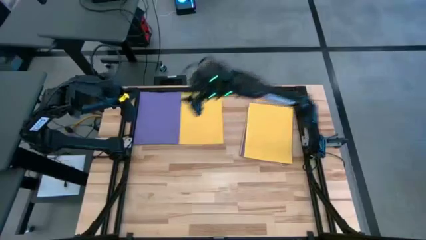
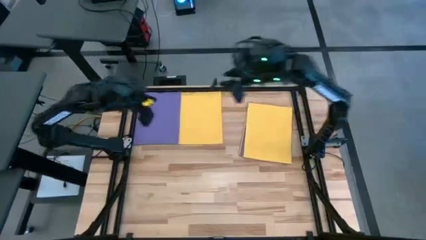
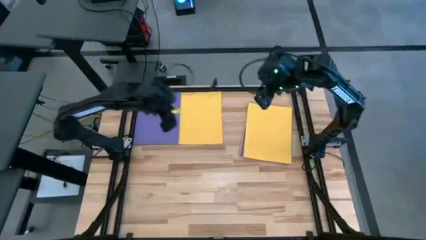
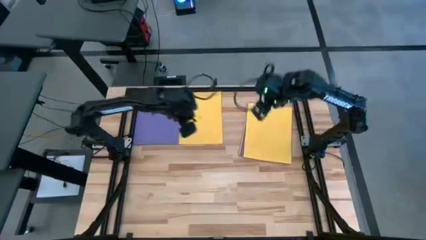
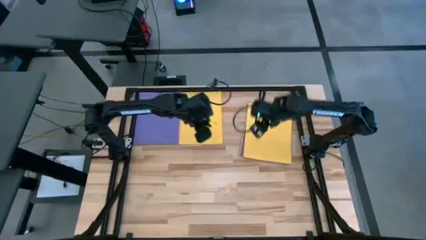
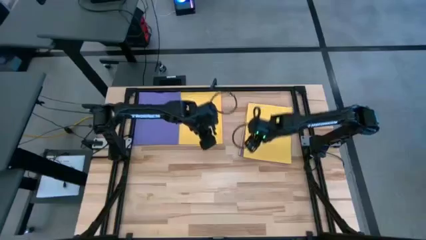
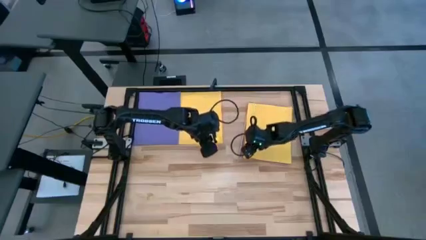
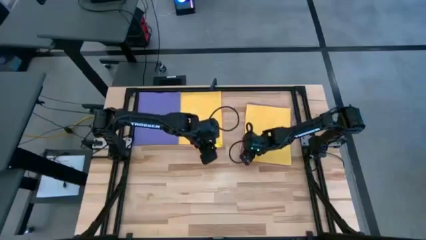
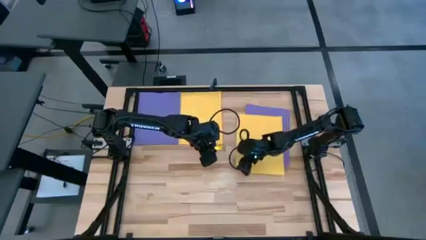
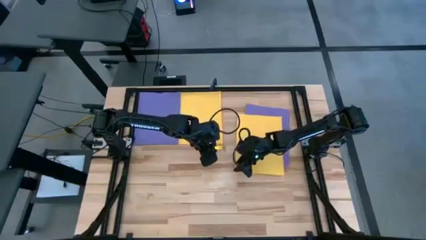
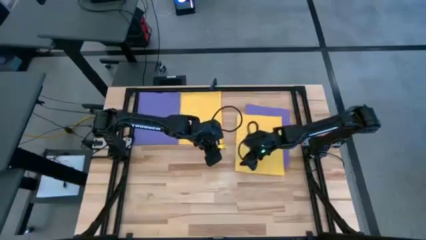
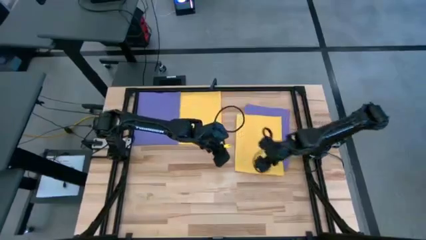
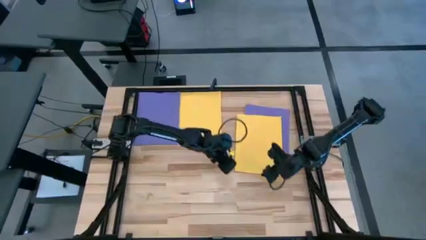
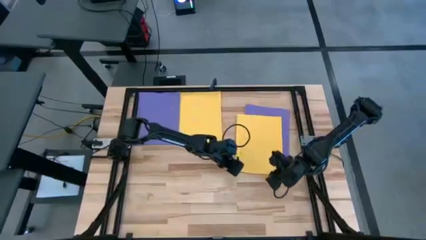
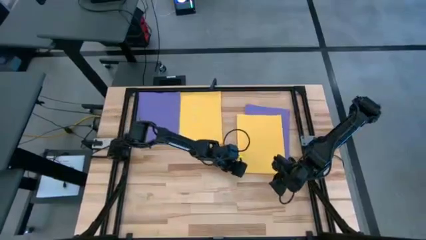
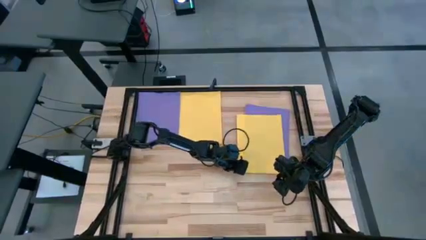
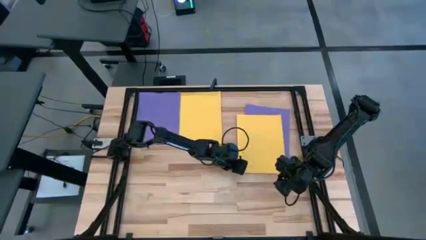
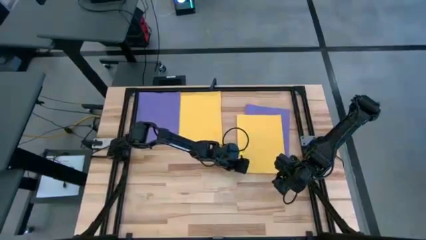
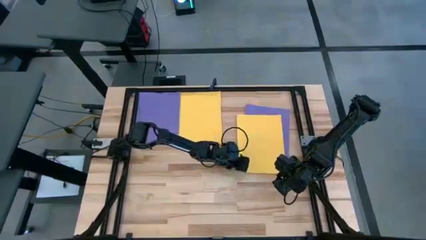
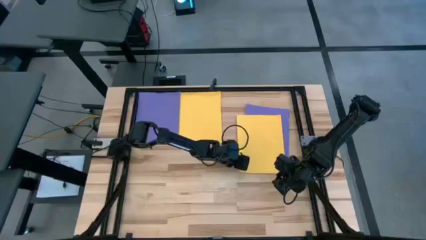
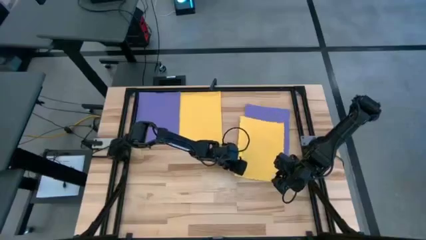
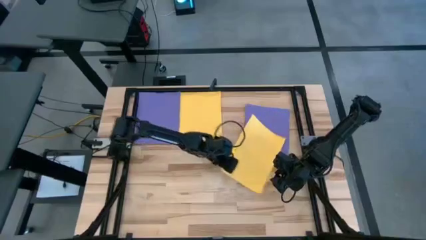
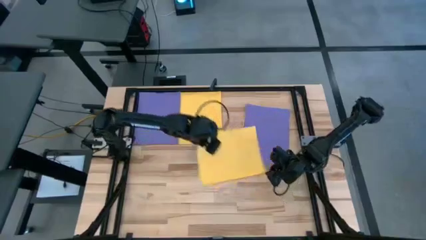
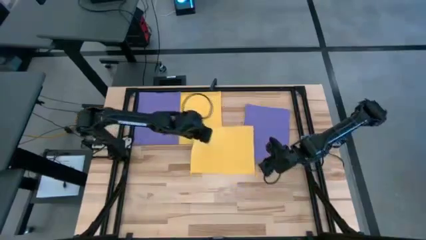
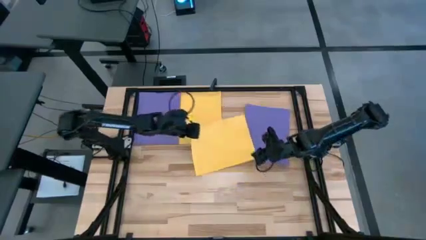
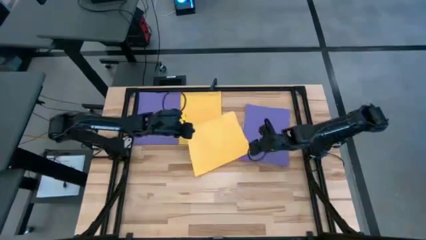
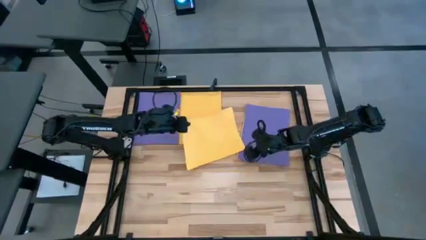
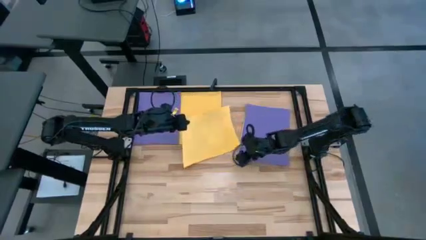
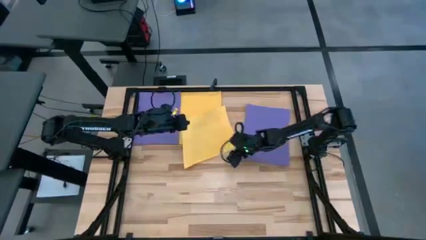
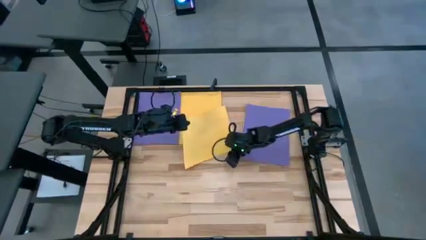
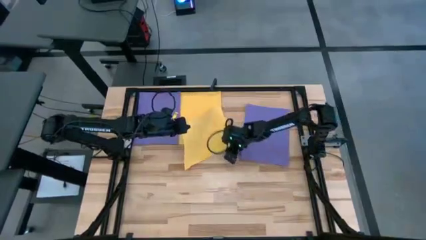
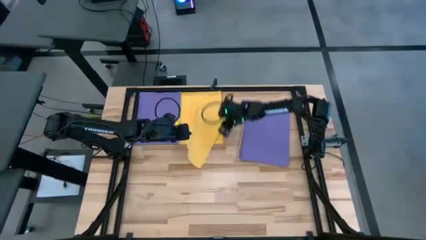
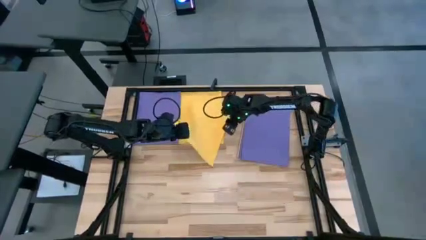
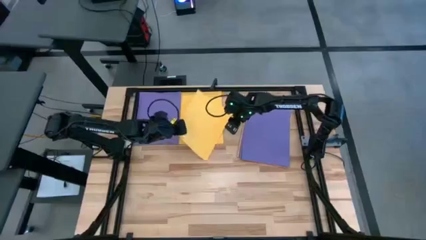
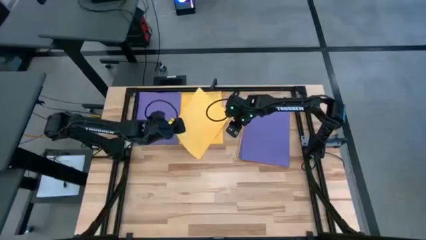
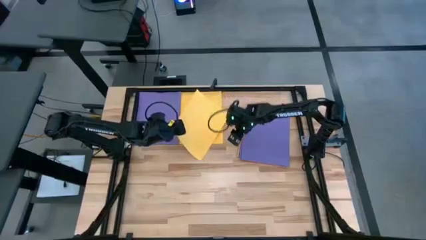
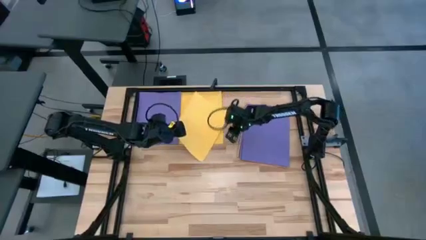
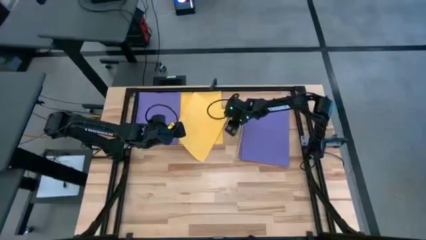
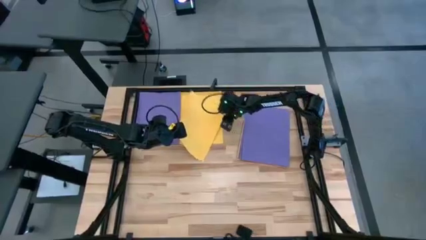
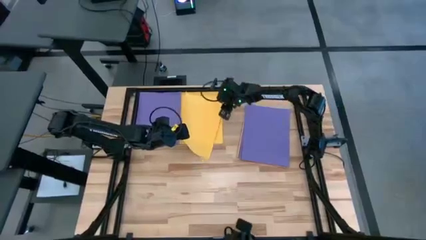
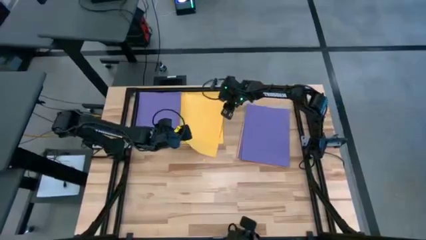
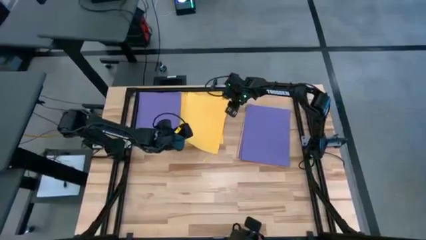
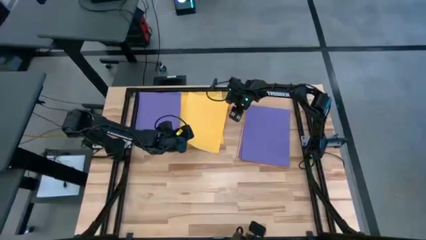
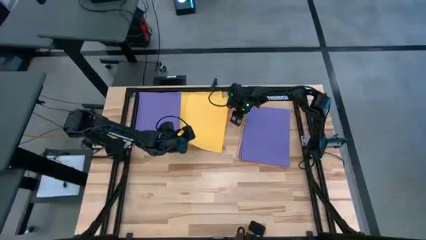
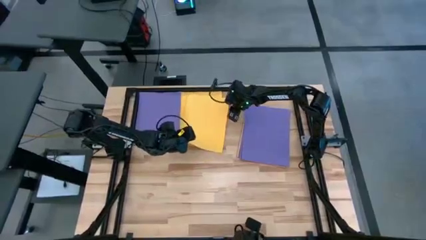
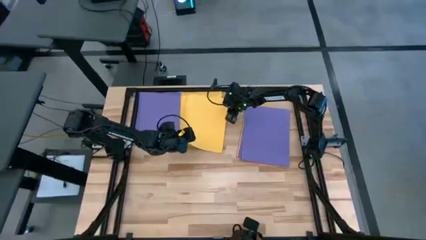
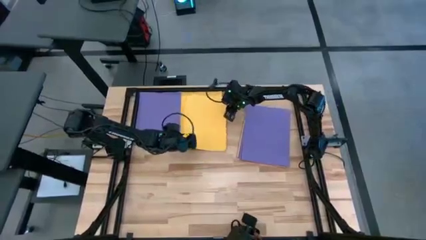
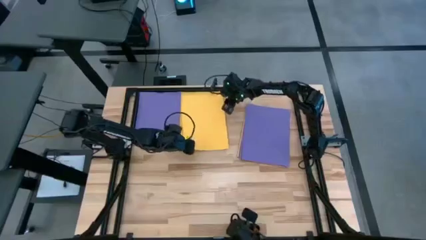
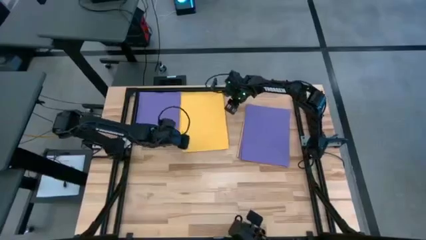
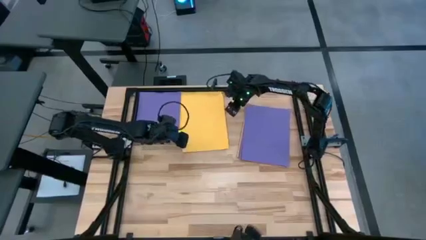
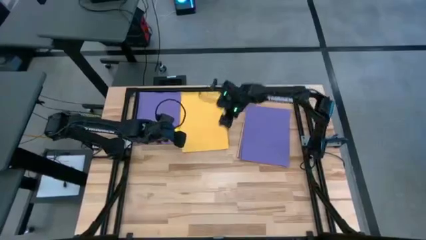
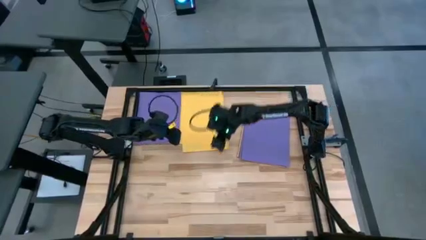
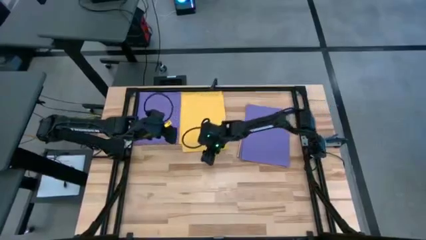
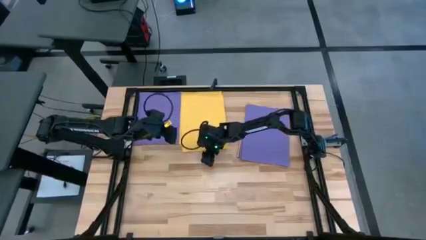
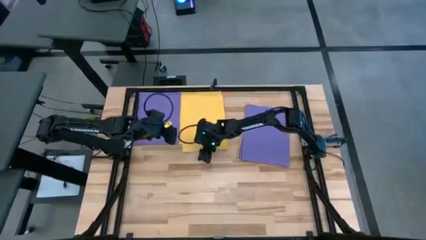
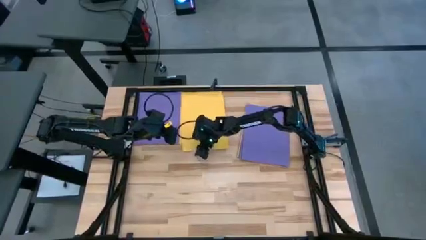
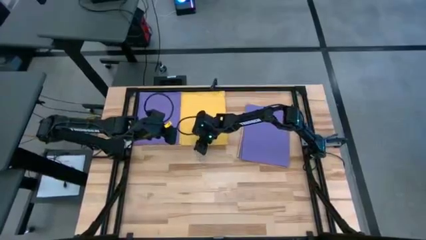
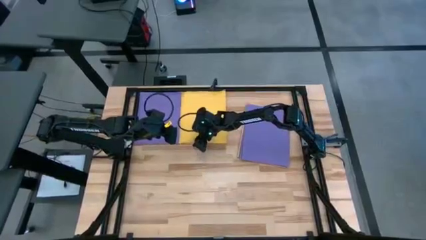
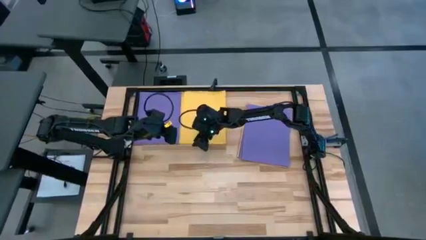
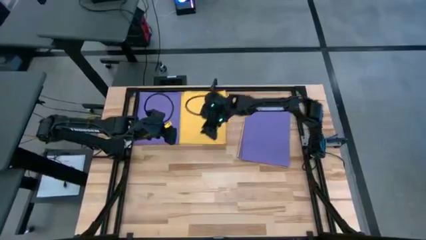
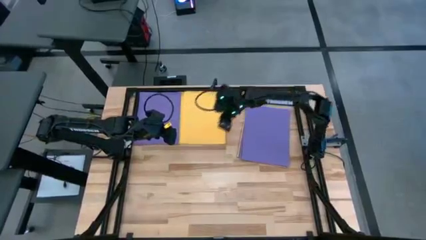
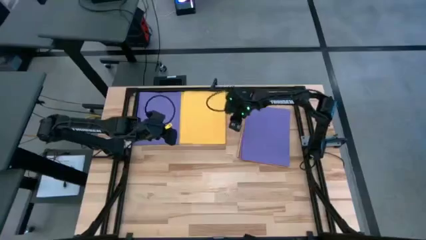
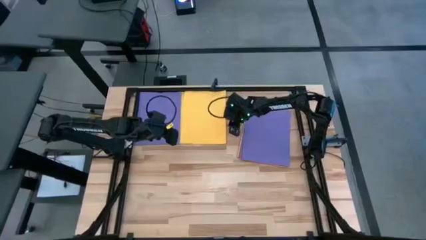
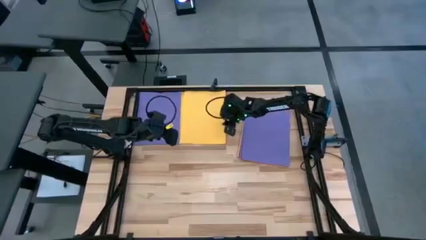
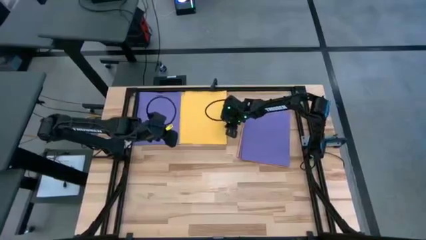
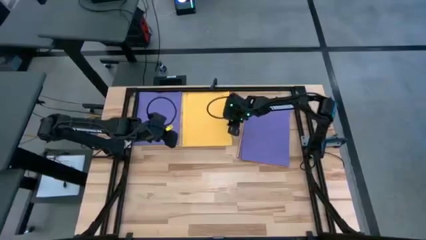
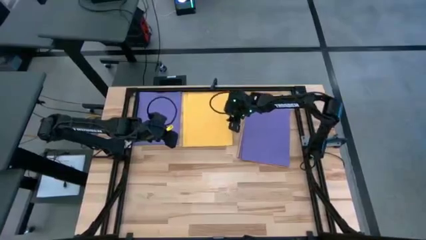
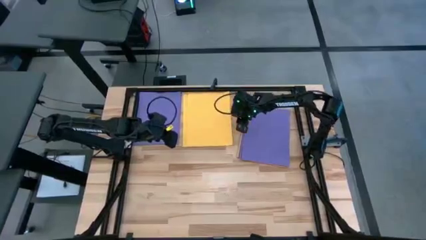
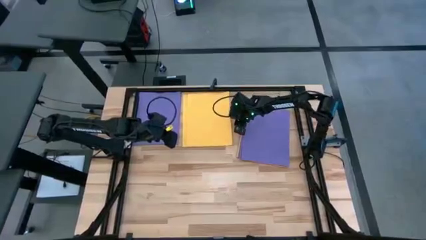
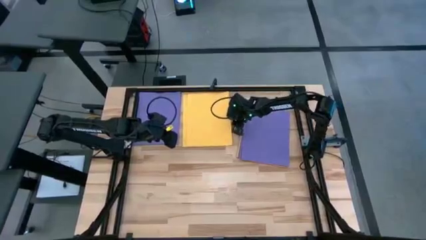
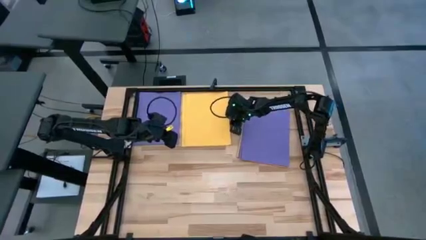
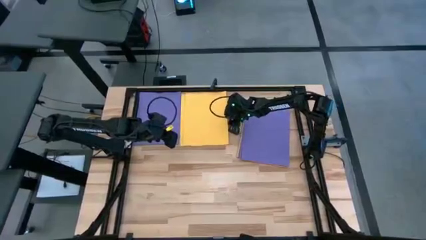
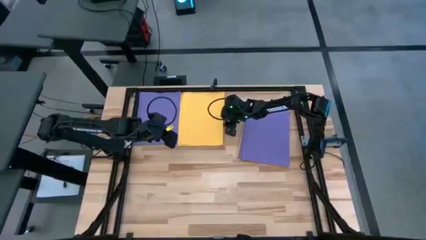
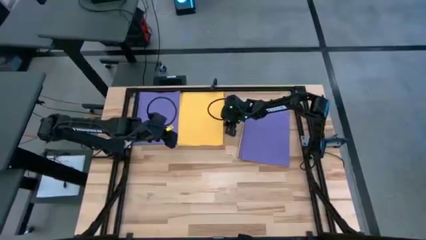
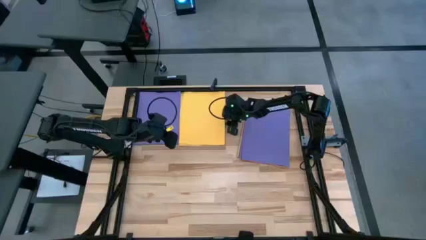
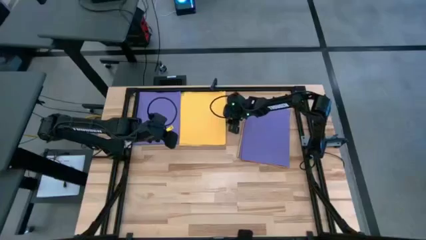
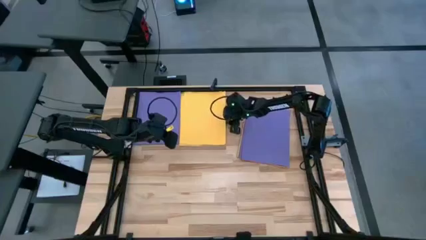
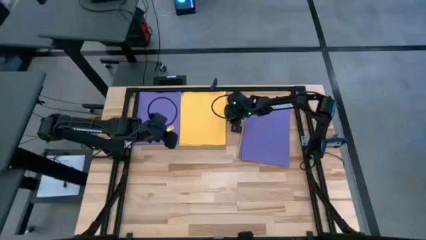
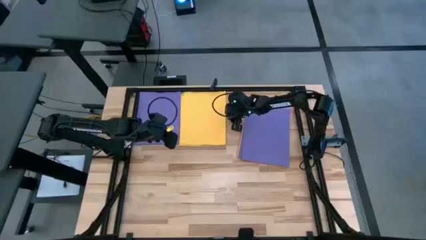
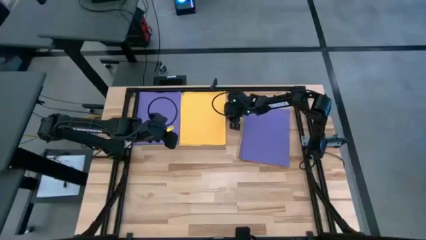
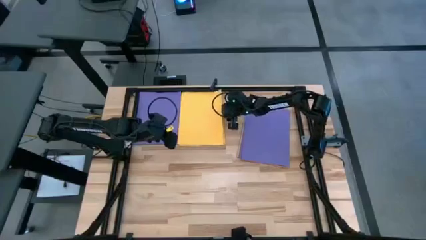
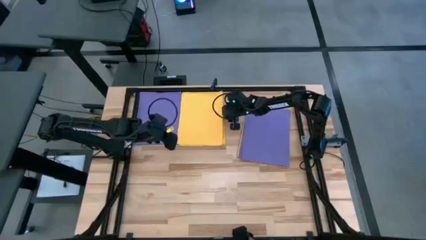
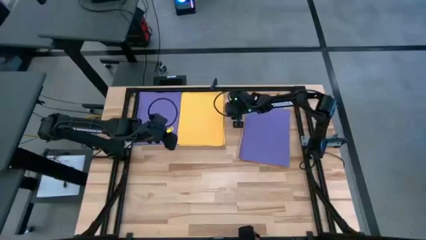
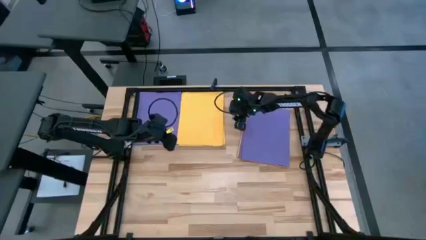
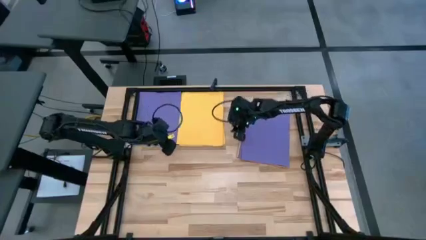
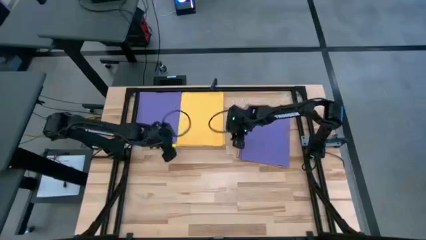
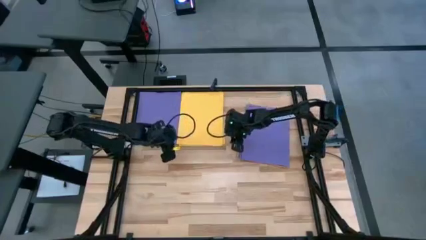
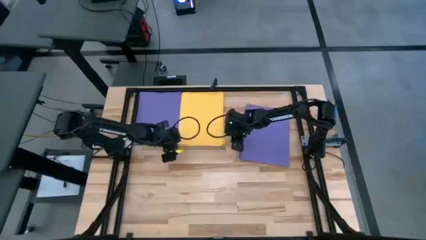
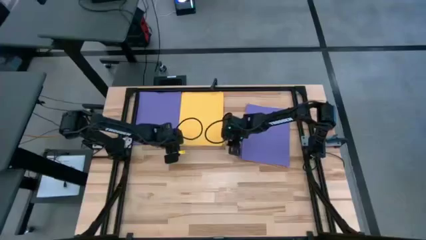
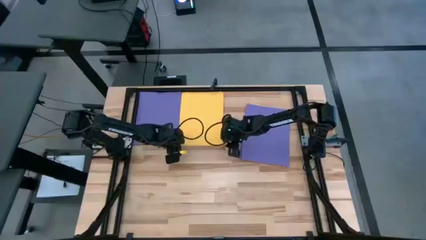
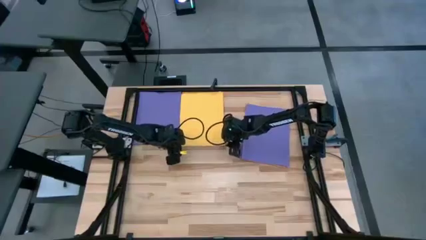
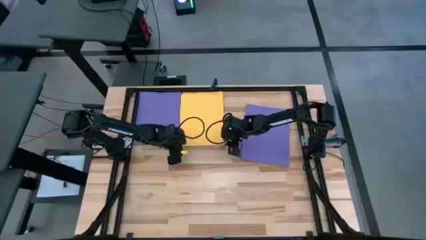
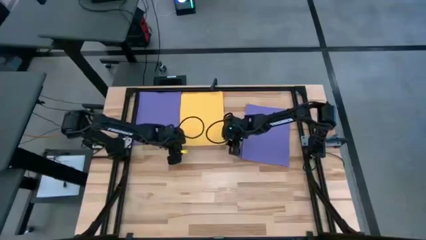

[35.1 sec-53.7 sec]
Task: Organize paper
Stack the yellow paper on top of the yellow paper
